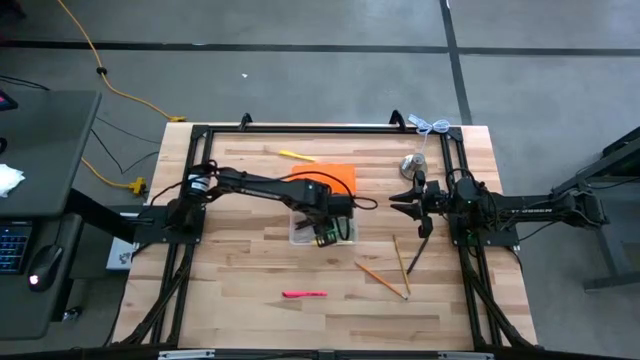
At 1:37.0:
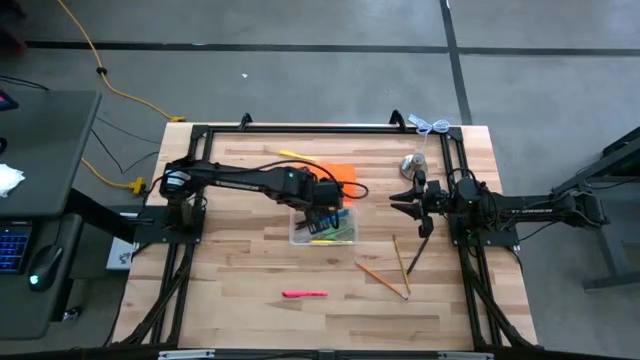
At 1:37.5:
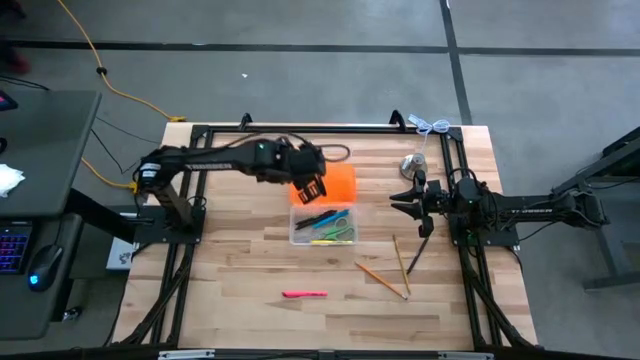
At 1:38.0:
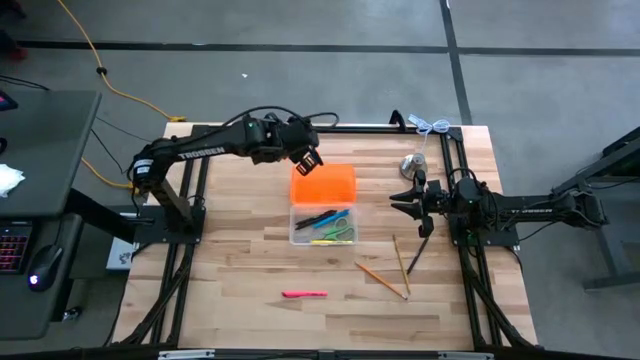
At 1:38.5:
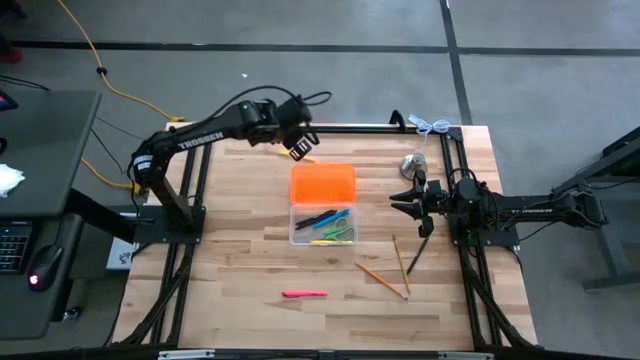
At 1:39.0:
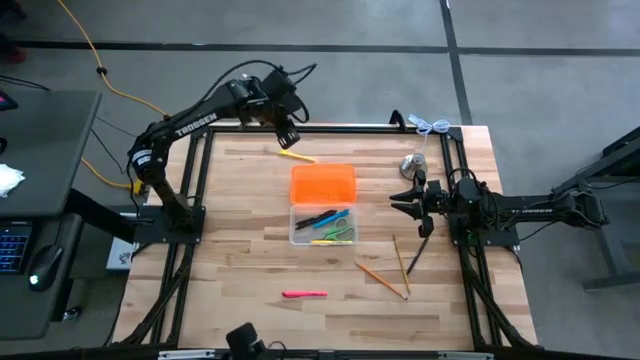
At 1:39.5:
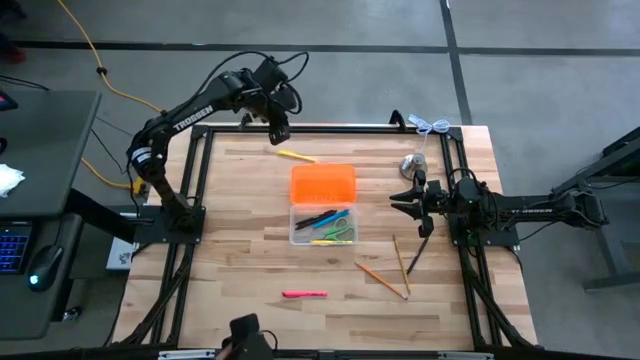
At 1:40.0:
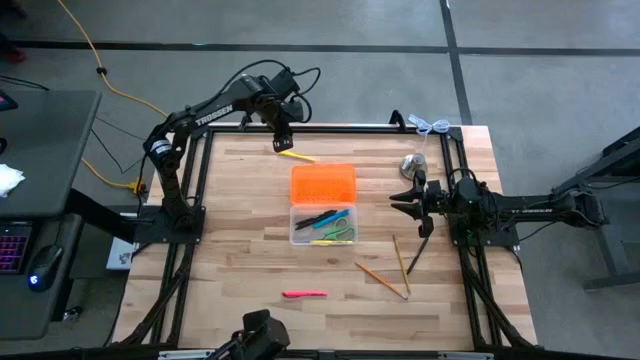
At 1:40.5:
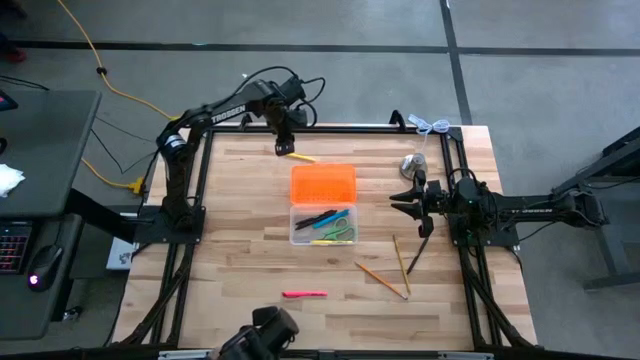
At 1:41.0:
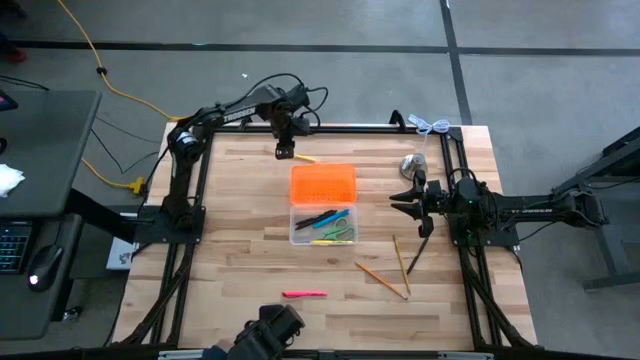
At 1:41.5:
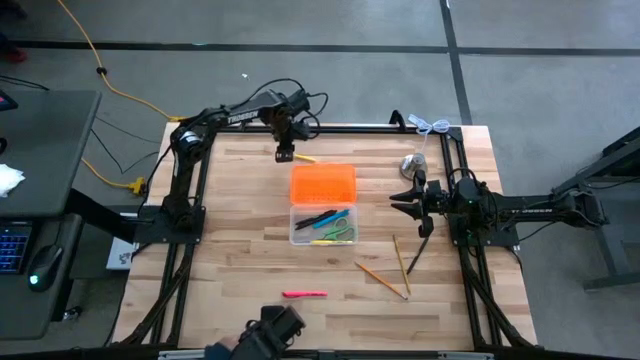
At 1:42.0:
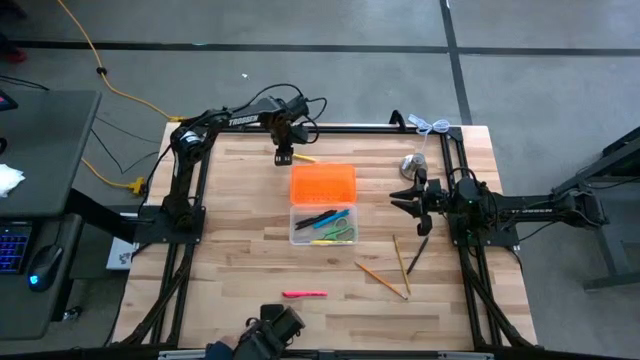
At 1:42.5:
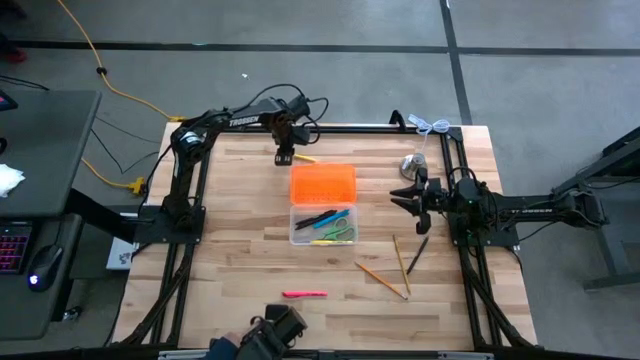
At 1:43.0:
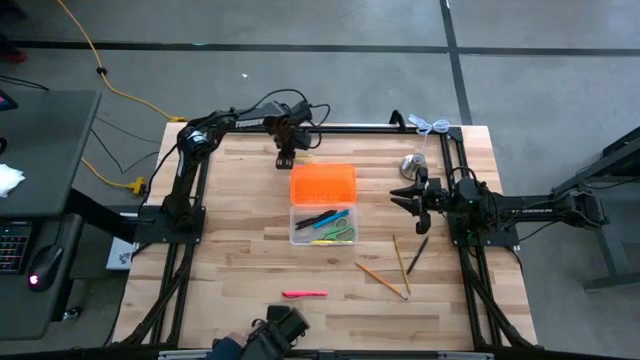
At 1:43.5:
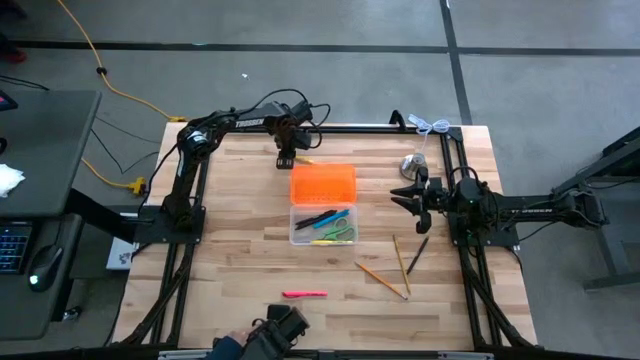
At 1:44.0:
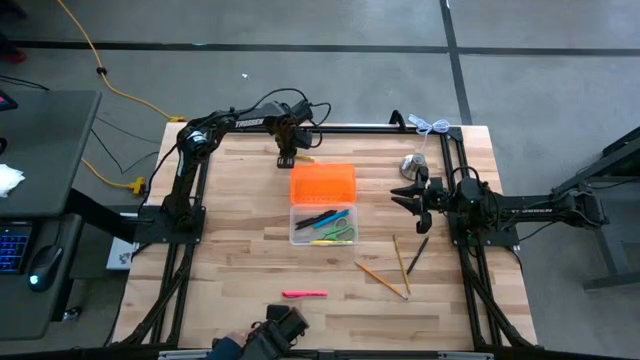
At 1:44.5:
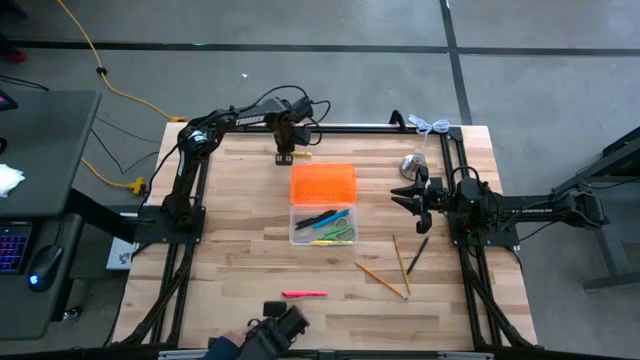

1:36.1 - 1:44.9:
Task: Pick & place school supplies into a supply box
Put the yellow pen into the orange supply box

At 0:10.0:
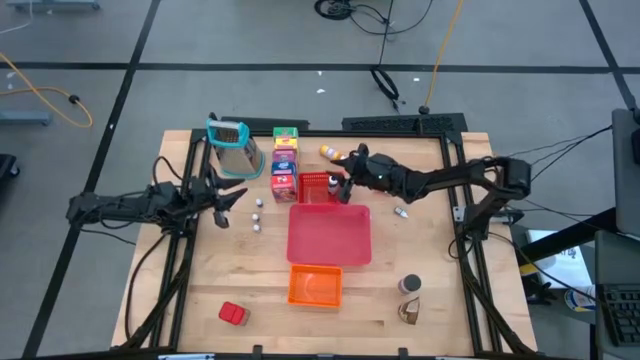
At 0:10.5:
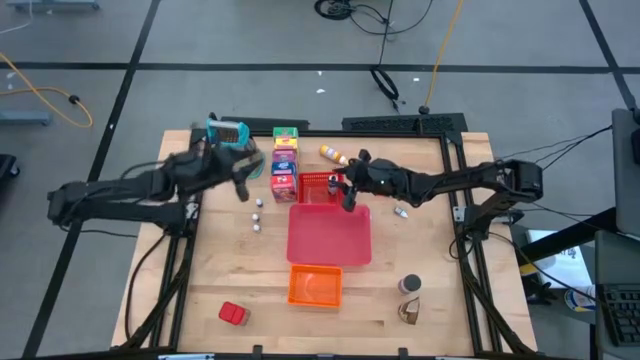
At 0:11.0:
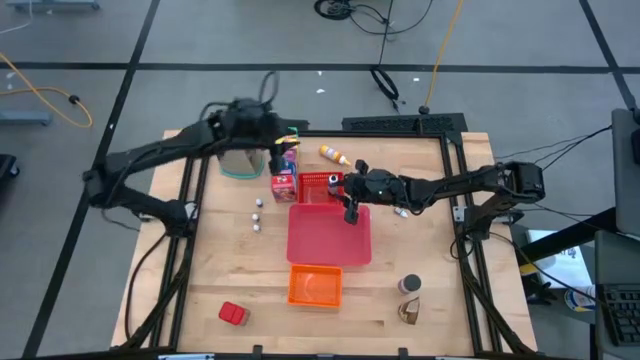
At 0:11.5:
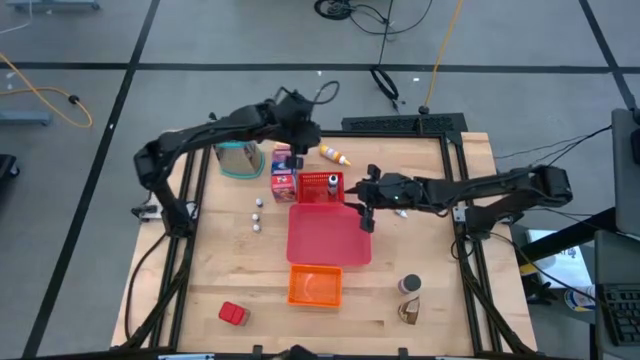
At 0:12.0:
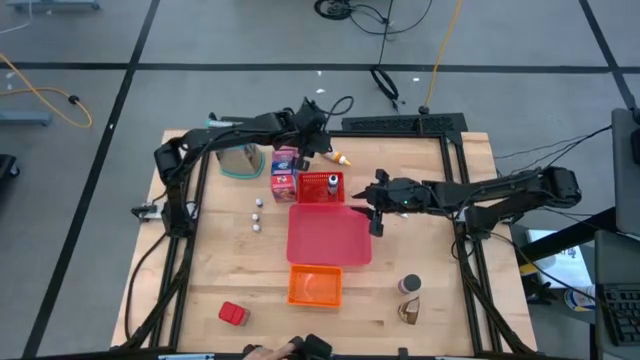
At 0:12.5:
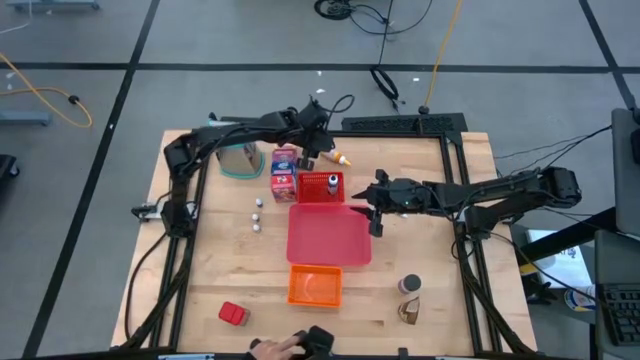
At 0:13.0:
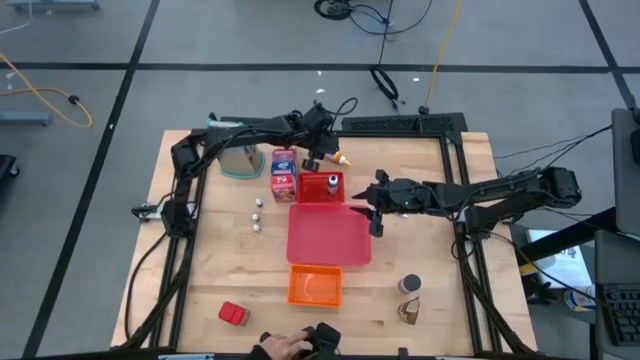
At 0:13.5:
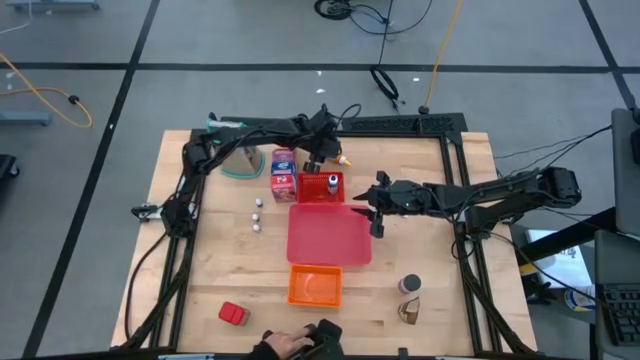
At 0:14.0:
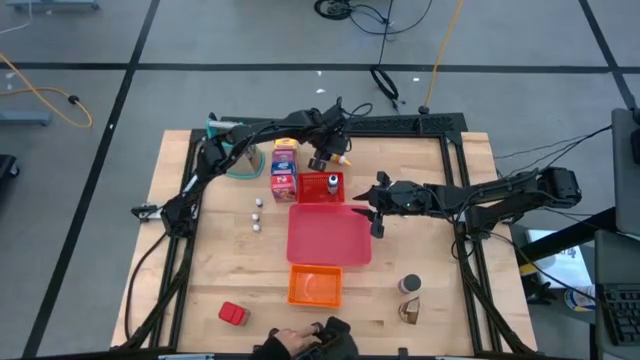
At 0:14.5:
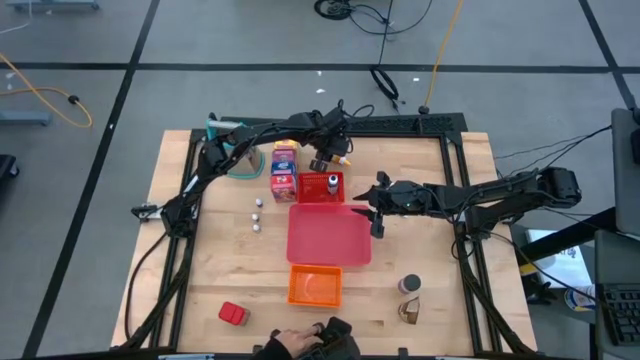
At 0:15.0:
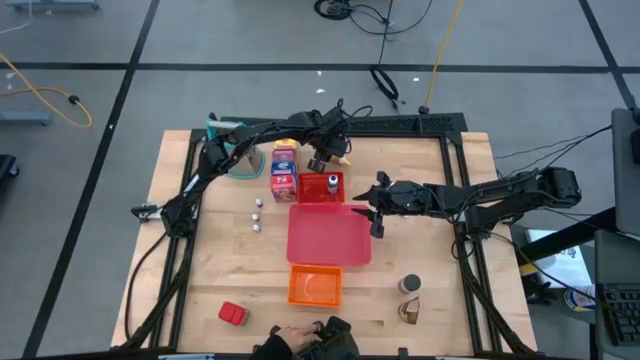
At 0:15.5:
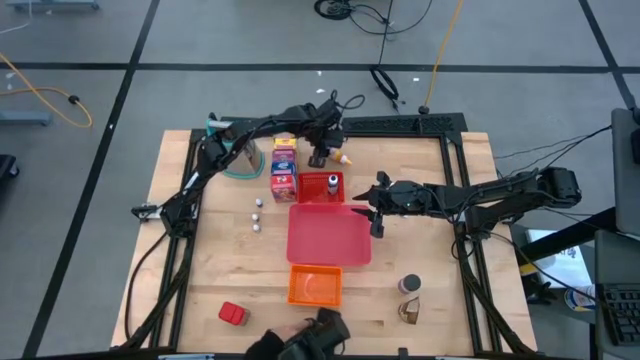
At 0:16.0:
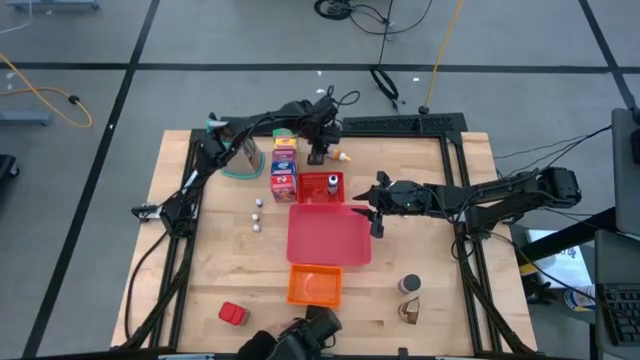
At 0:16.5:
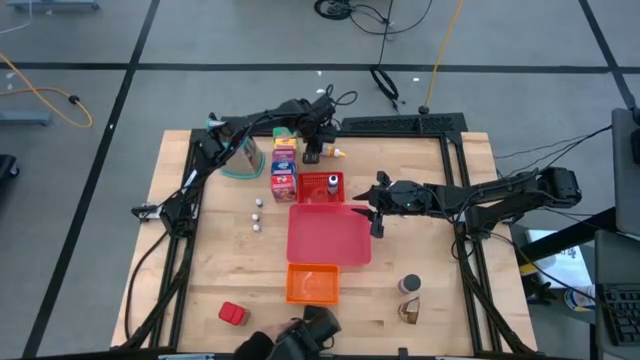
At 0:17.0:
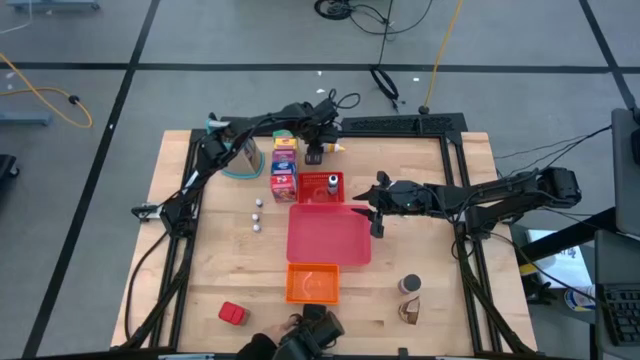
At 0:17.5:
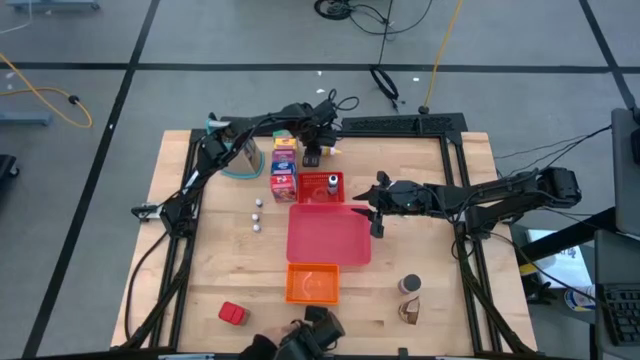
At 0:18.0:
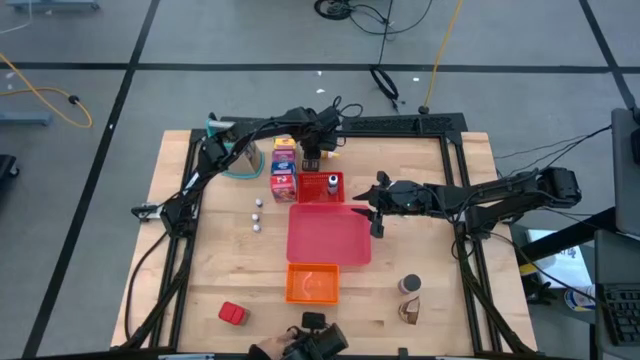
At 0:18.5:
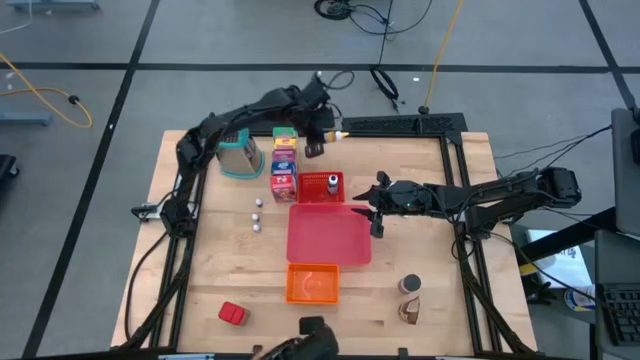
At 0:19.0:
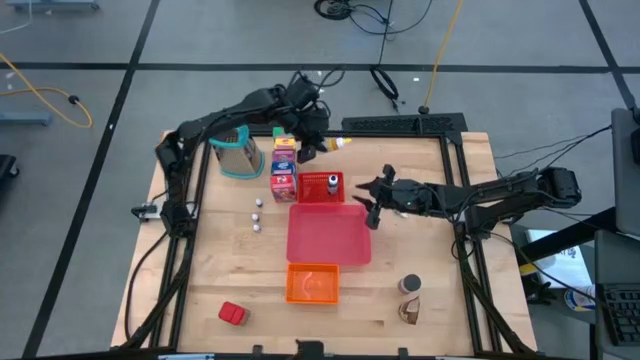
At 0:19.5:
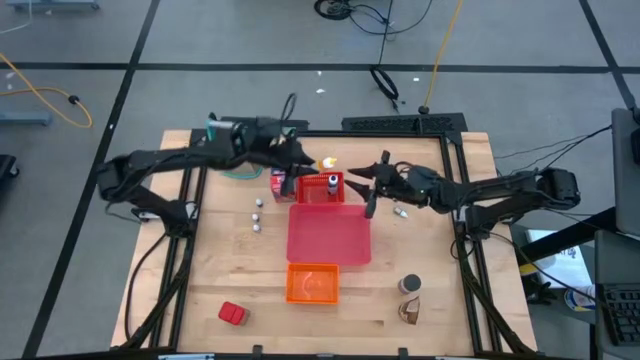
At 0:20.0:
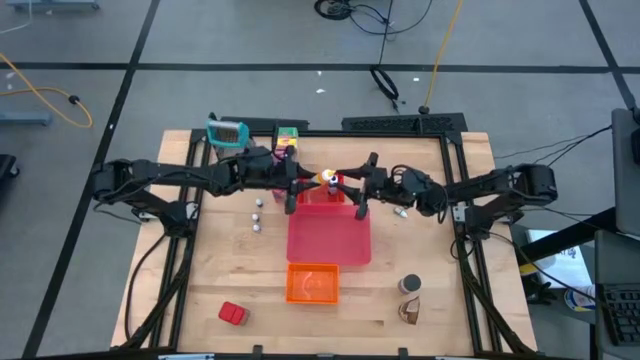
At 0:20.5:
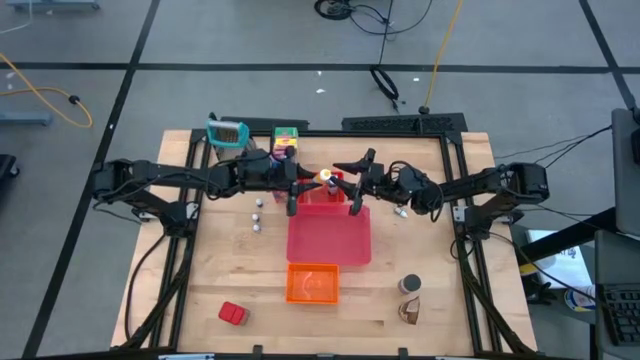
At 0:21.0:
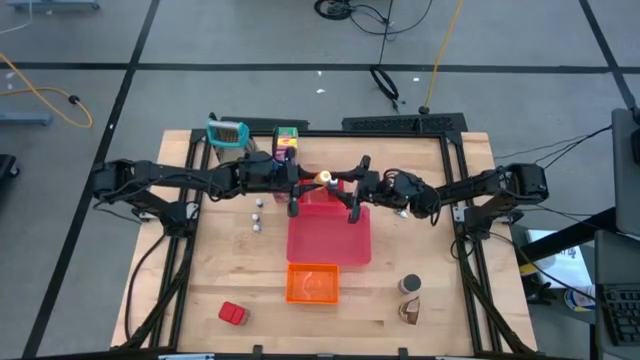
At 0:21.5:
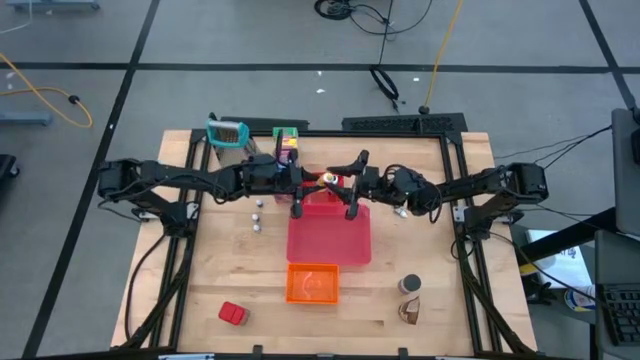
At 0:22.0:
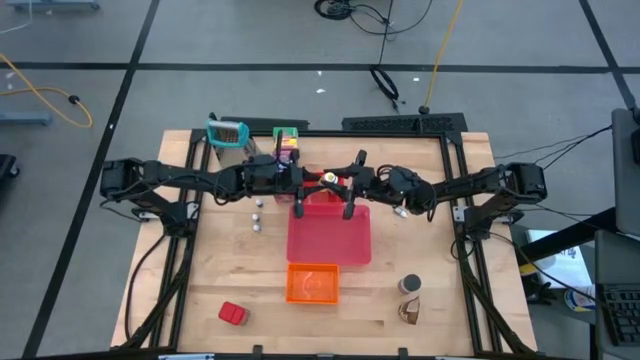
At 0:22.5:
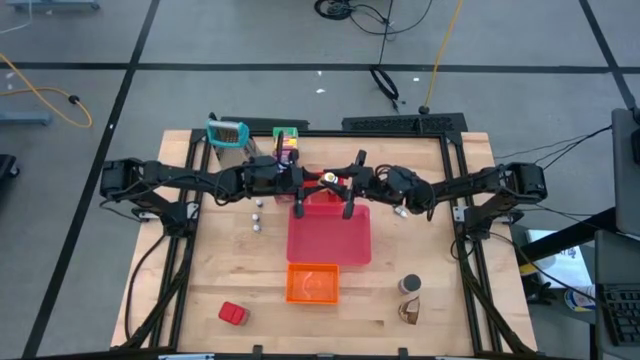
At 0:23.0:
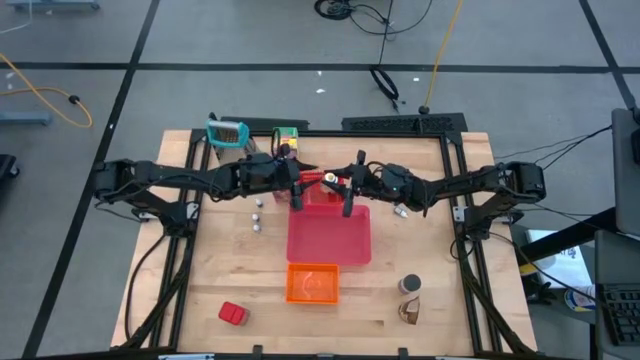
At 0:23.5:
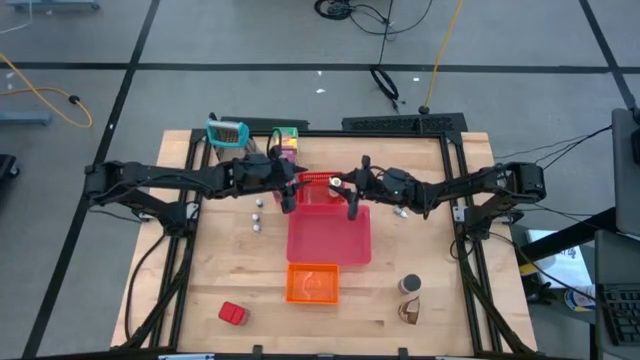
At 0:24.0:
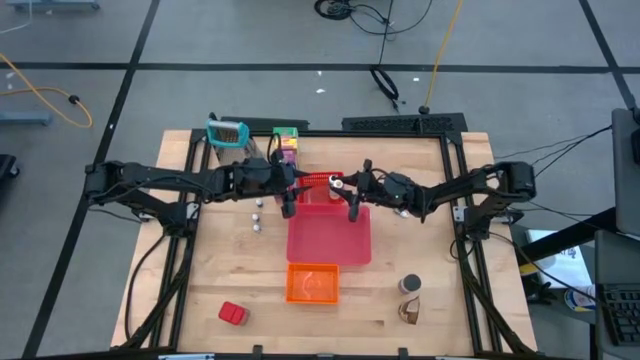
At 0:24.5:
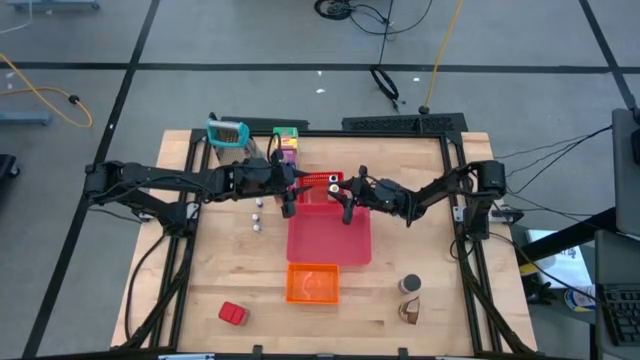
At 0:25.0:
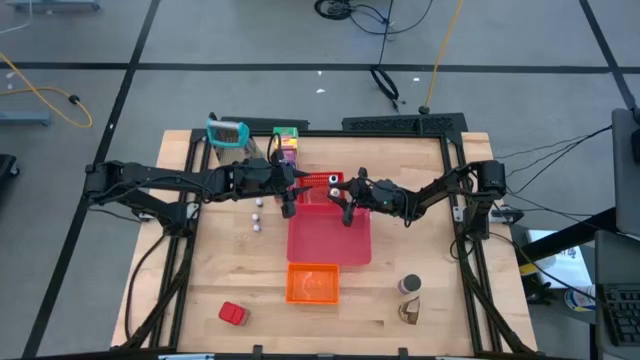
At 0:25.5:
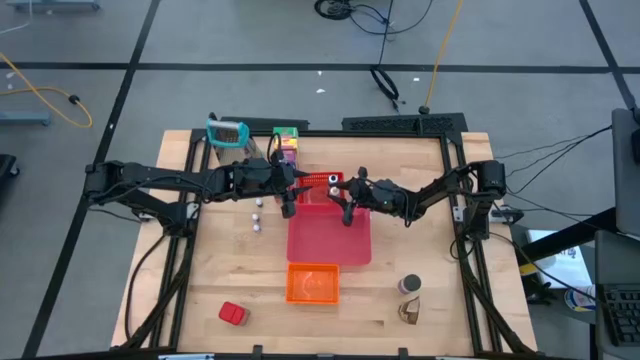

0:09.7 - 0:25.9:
Task: Pick & Place Kitchen Items
Put the yellow food coloring bottle into the red bin
